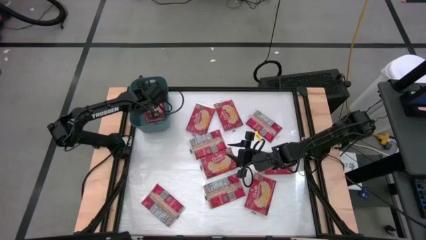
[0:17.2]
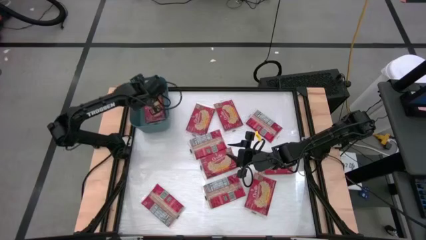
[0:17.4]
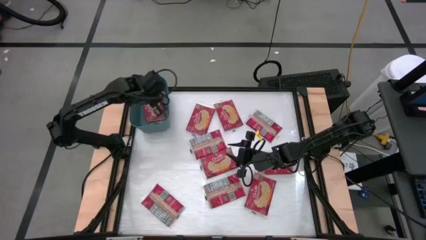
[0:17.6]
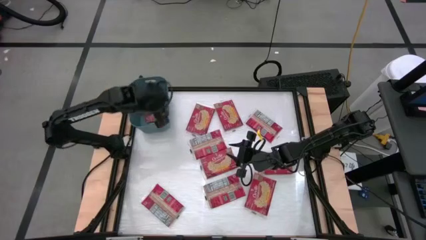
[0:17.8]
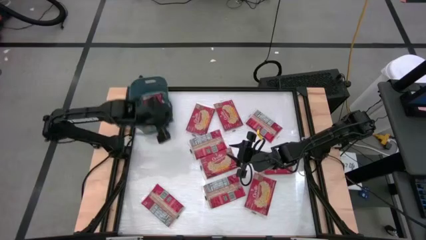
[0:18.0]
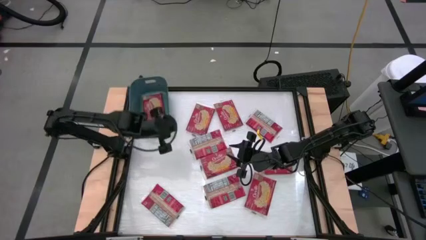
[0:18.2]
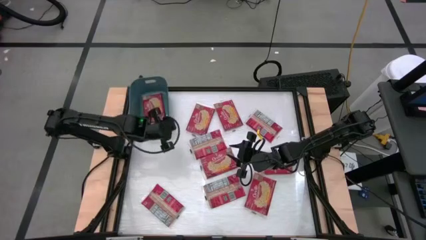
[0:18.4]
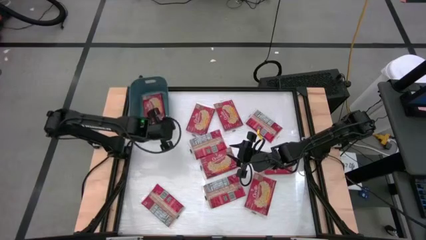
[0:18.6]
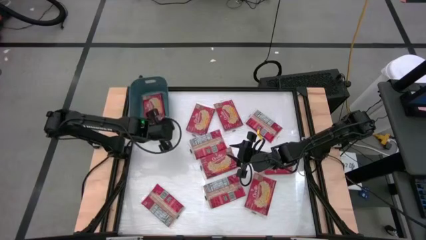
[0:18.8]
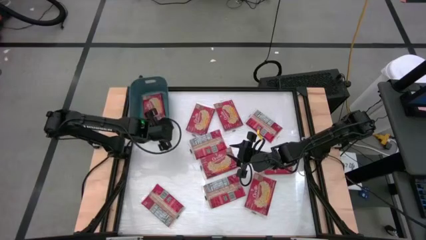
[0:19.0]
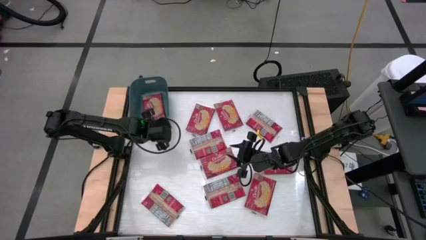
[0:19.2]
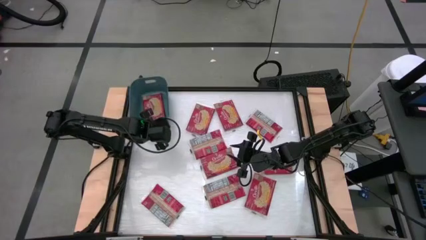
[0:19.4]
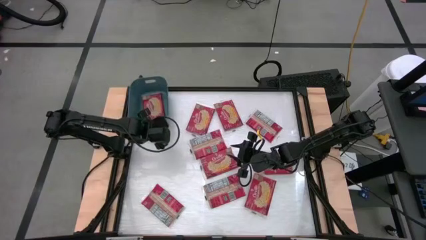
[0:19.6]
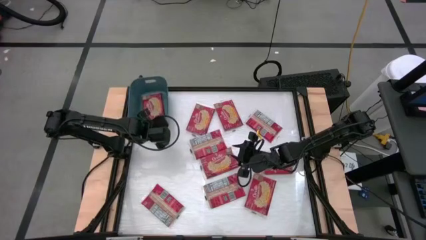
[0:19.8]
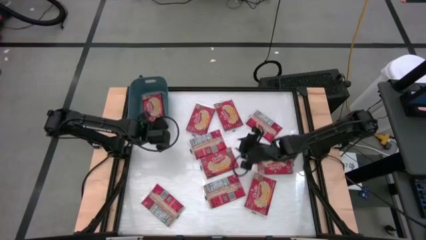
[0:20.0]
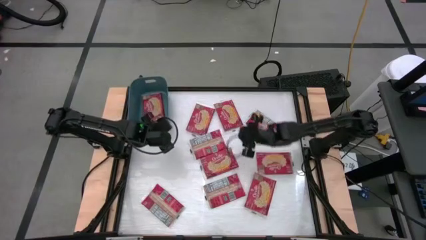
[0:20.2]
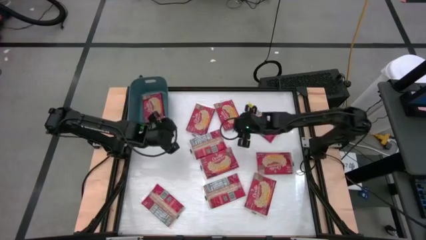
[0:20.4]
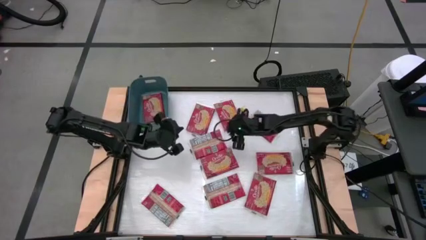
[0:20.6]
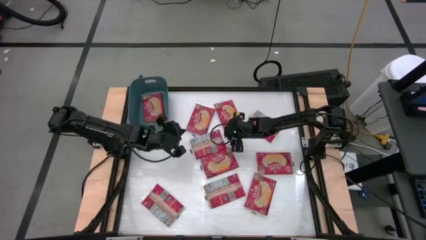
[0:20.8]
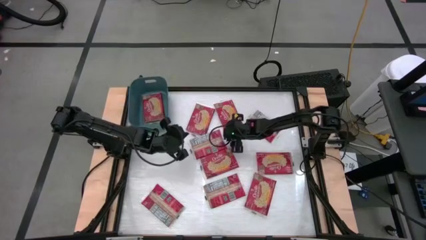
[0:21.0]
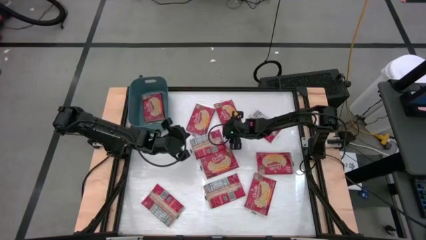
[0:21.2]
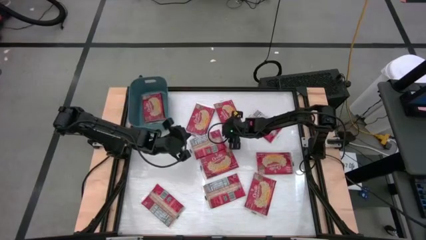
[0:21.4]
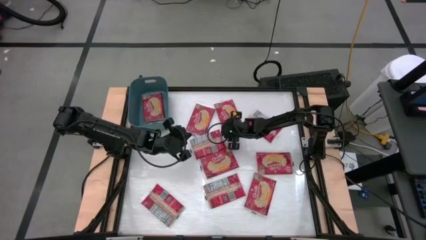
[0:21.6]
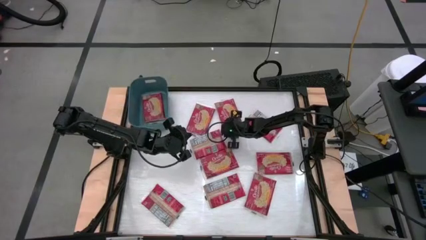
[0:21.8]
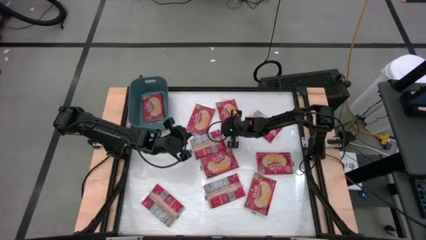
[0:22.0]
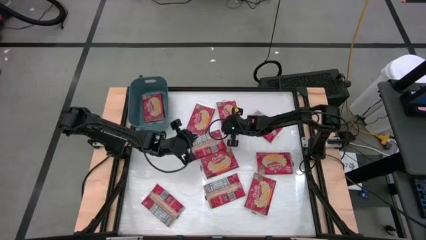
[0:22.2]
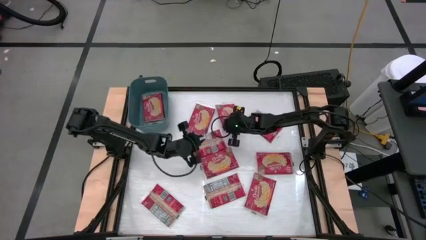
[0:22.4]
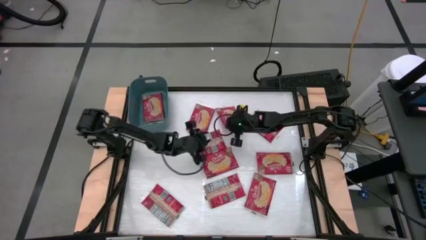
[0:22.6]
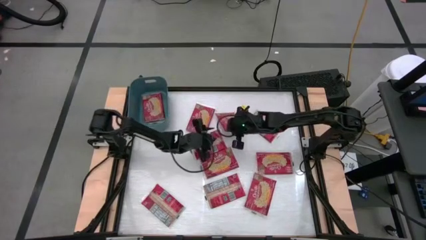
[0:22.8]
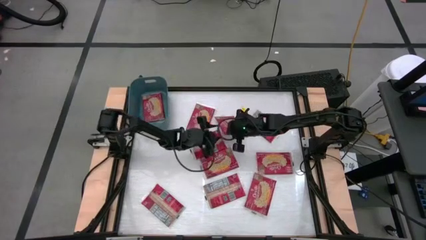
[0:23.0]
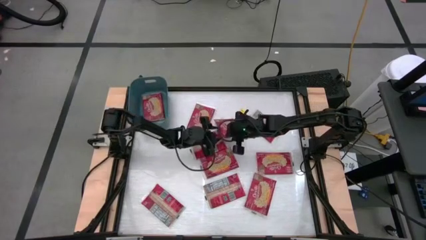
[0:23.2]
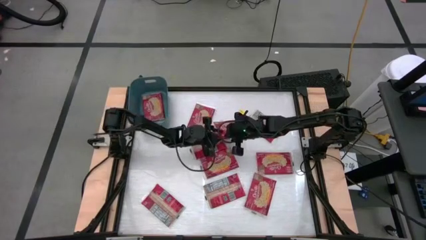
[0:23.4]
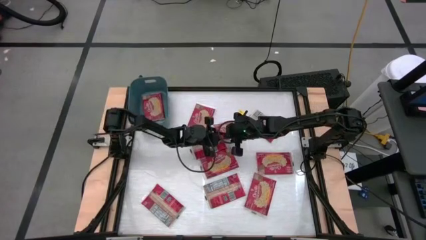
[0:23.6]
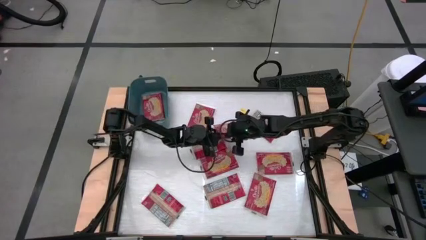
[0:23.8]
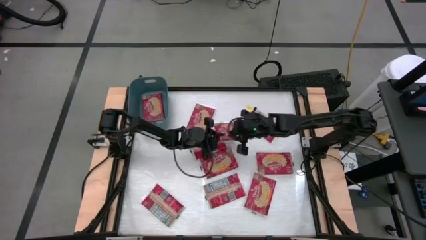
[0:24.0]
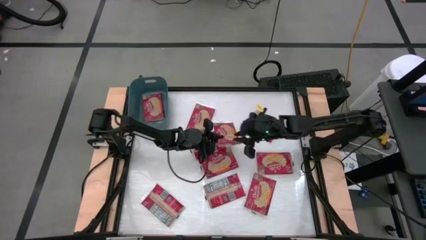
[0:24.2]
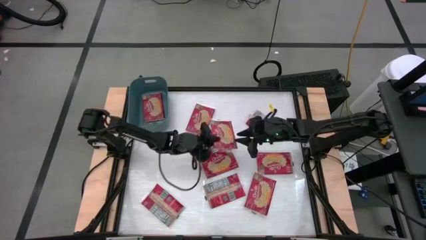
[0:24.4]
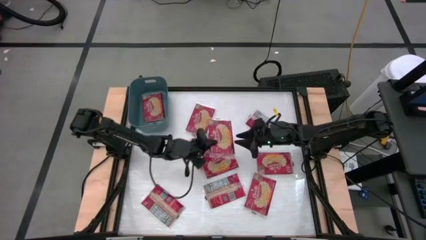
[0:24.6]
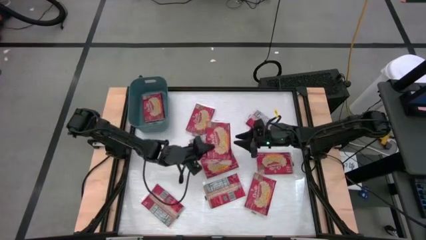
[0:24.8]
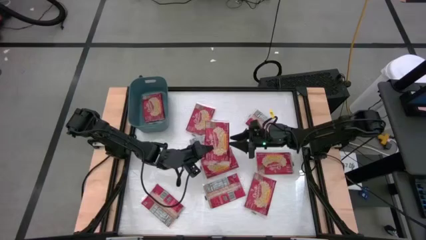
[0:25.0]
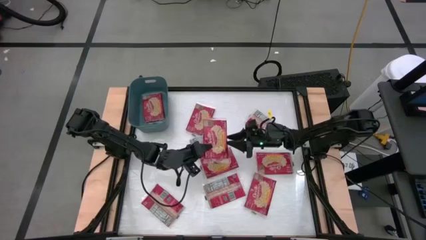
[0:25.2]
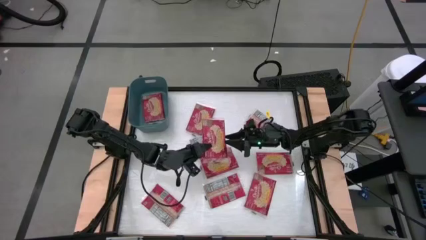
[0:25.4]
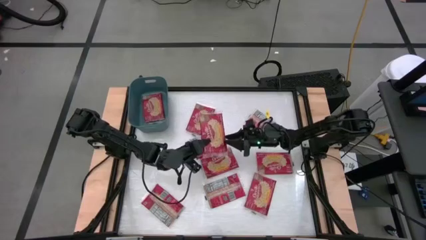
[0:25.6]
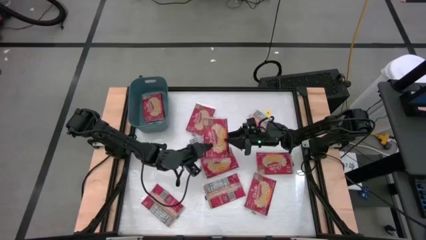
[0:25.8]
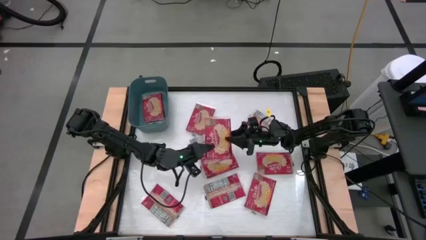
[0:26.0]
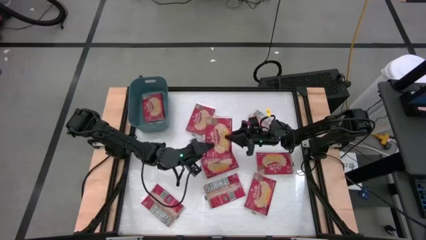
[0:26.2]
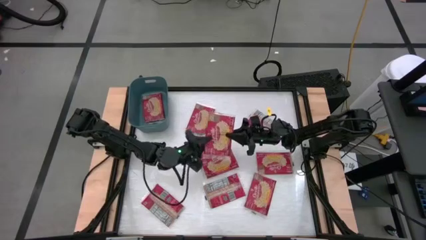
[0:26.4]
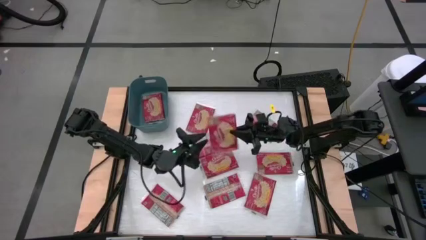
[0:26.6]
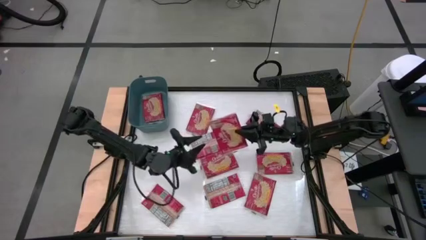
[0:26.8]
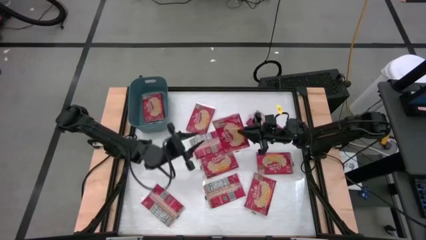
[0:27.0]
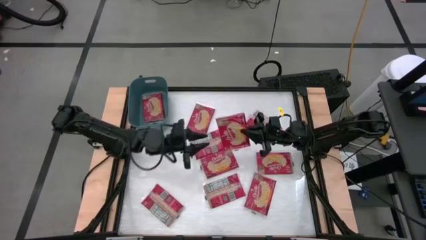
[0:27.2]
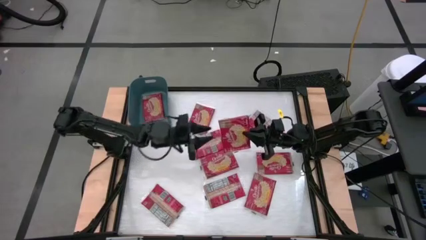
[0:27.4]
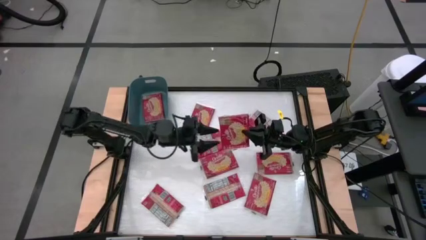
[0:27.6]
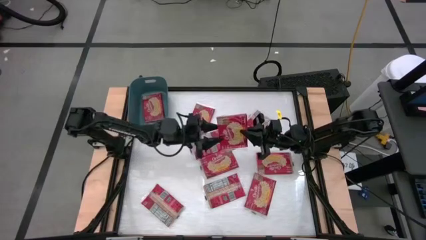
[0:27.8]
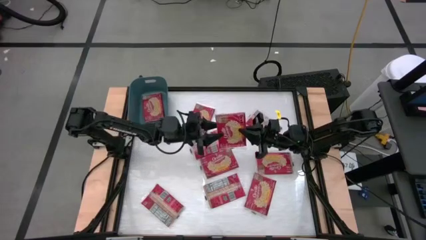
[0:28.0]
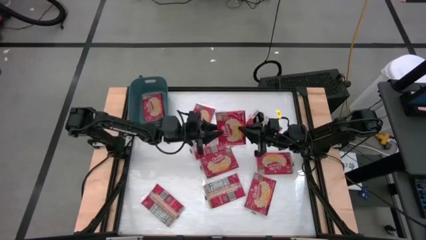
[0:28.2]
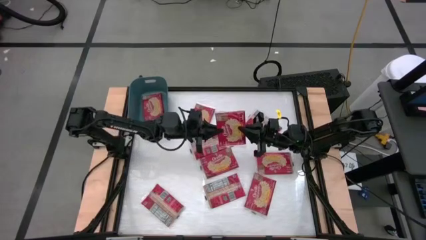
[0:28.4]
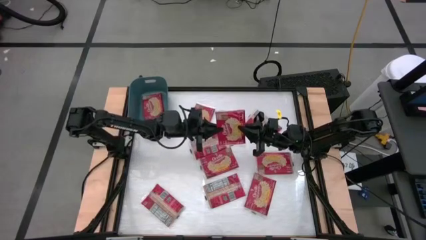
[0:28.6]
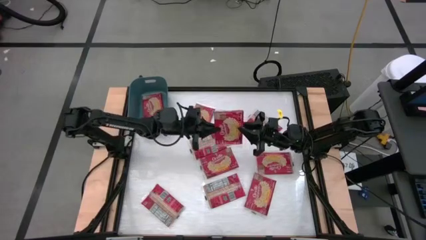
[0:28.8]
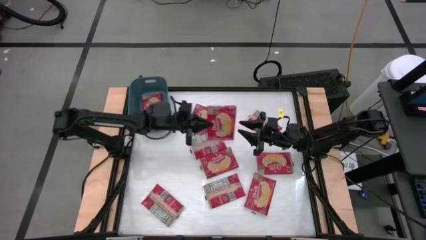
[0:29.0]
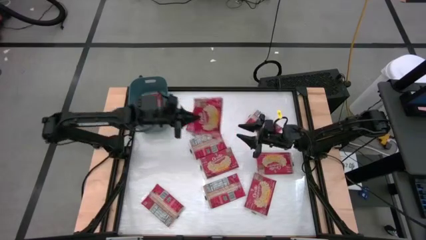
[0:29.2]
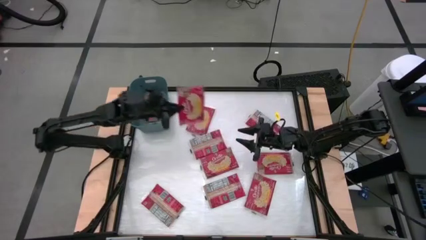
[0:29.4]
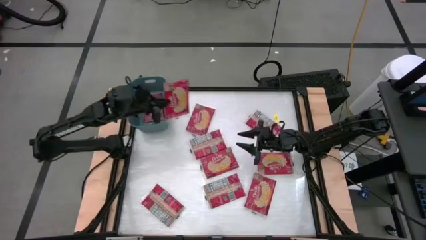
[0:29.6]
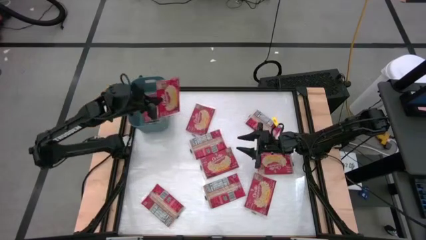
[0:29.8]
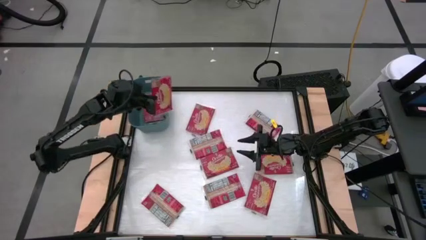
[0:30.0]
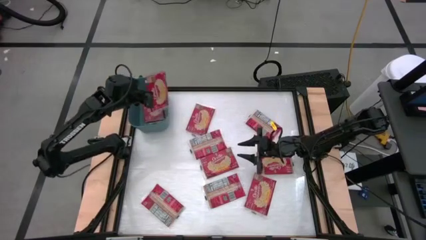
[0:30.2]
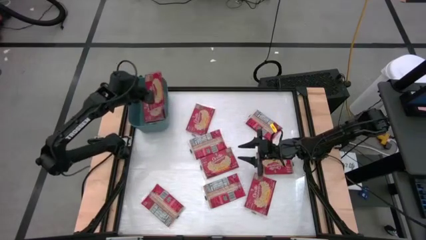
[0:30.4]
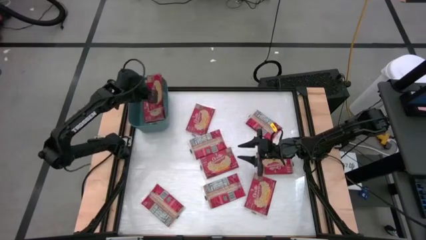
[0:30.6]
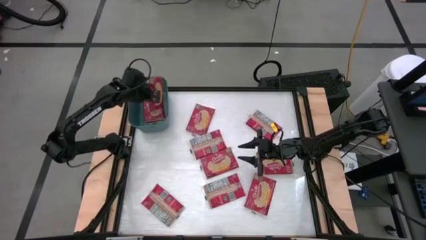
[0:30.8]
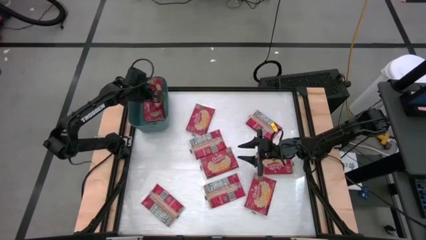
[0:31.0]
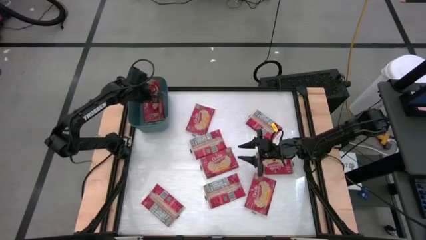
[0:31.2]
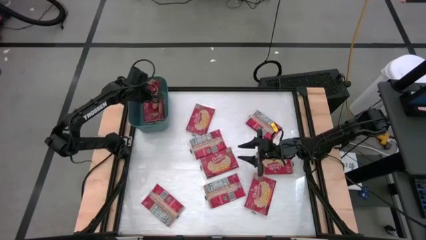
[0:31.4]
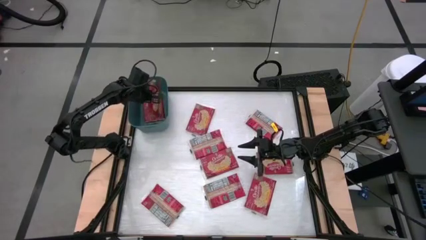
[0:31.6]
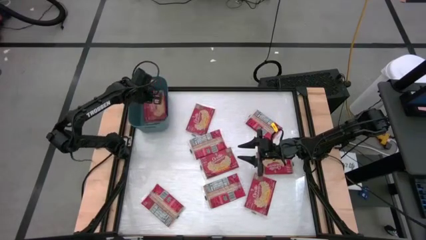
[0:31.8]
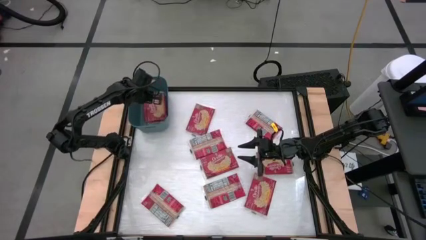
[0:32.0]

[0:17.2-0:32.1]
Task: Sort popcorn bags into baskets
Stack the red popcorn bag on top of the other red popcorn bag into the blue bin

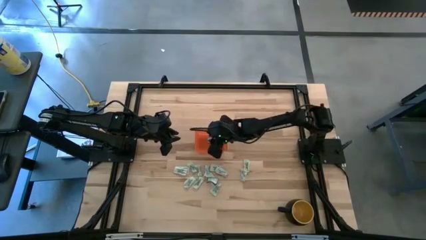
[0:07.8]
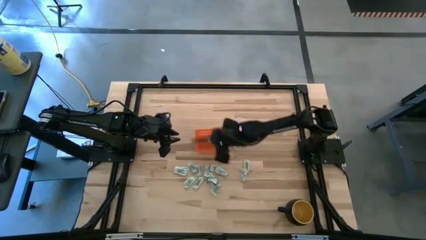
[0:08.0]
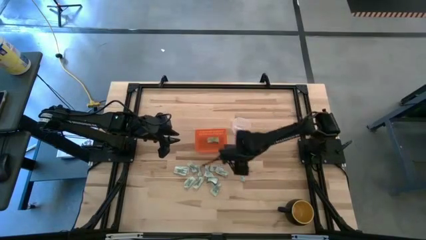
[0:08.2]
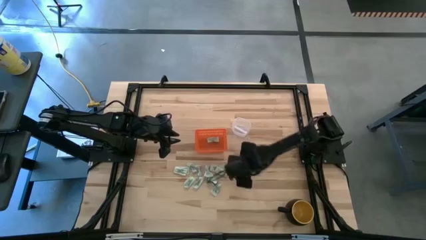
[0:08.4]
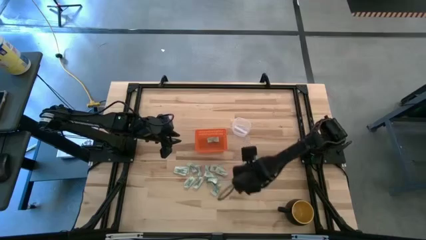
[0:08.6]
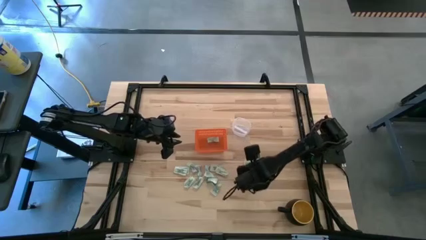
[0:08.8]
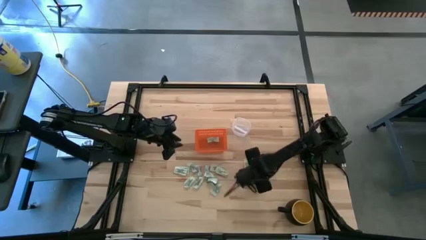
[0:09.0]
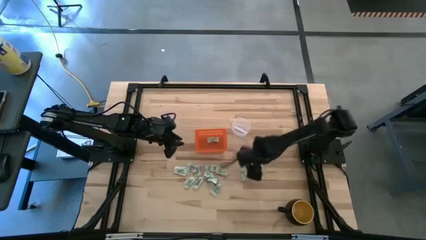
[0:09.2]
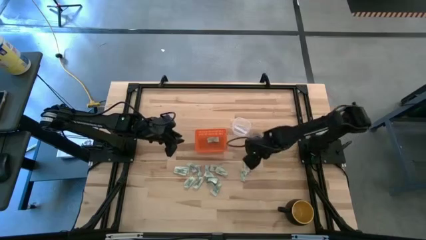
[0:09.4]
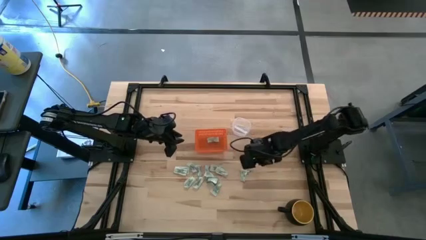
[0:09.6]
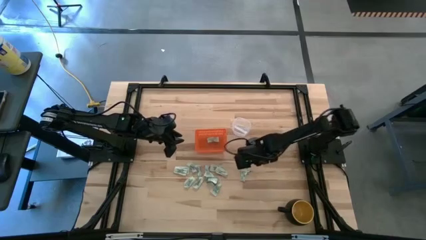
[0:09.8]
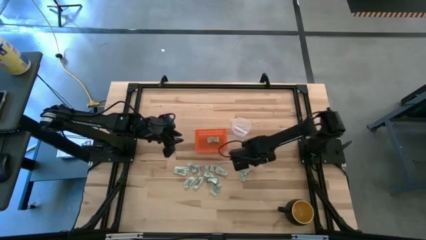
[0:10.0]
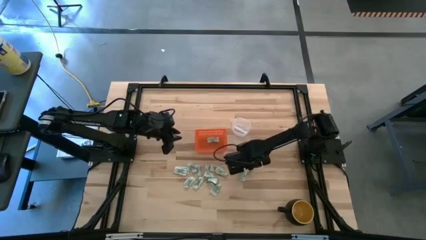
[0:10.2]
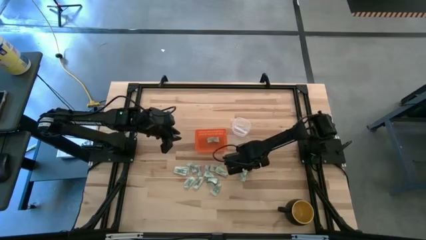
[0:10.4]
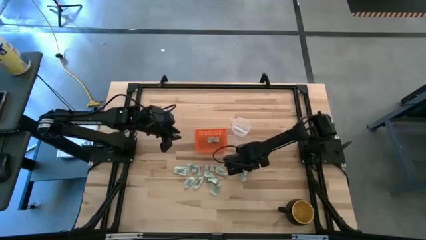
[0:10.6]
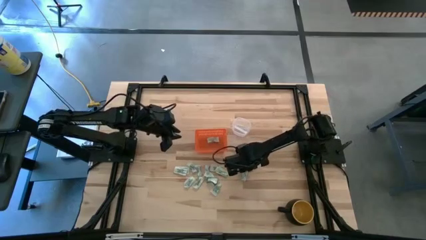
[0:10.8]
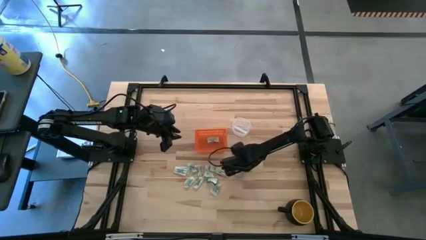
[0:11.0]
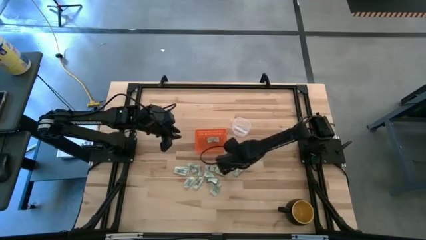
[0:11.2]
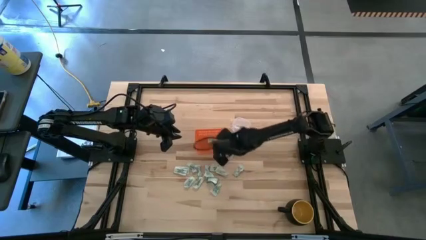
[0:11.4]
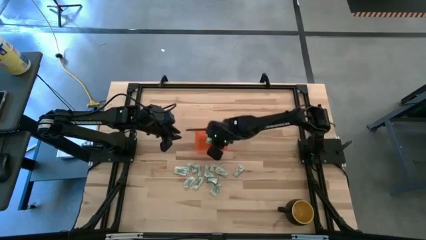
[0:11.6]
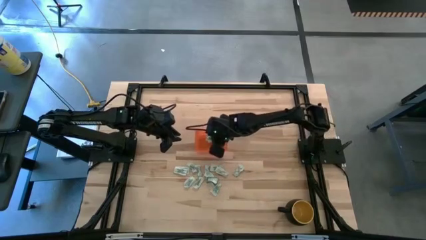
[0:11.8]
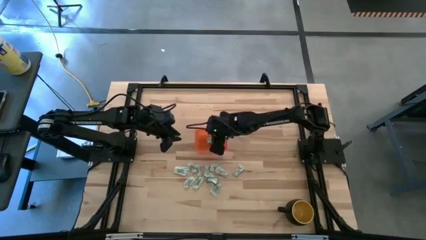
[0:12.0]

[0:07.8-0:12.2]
Task: Pick and place Stevia / Truvia into bins
Put the stevia packet into the basket
